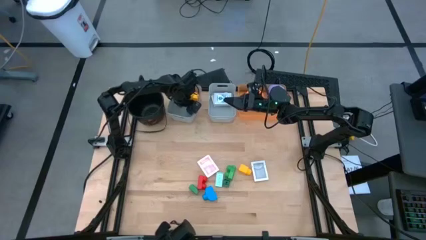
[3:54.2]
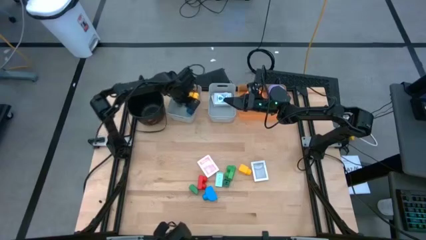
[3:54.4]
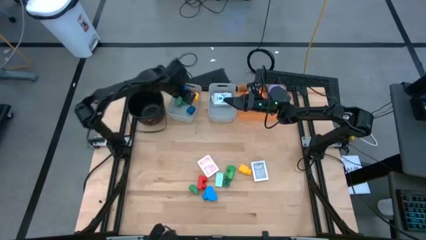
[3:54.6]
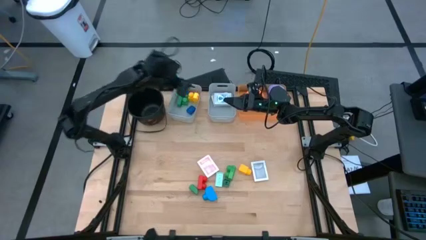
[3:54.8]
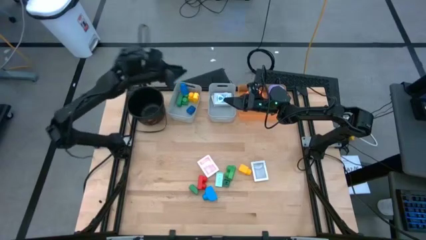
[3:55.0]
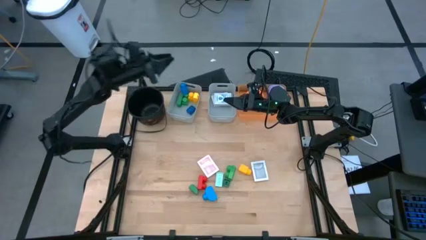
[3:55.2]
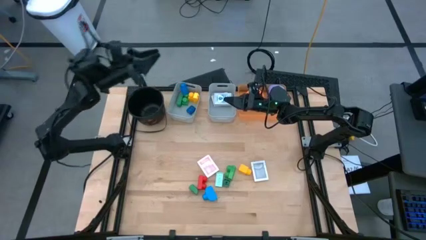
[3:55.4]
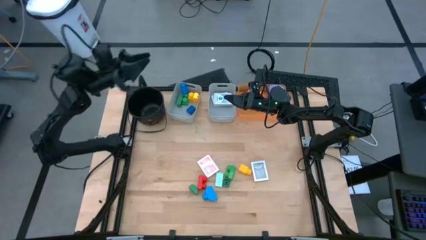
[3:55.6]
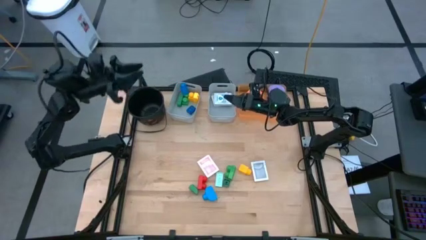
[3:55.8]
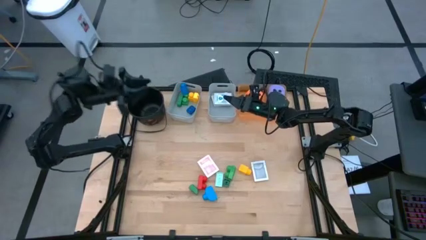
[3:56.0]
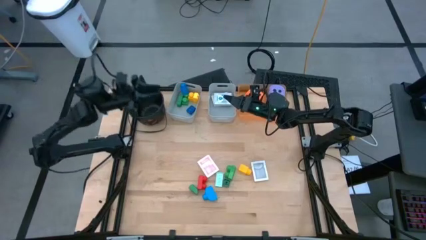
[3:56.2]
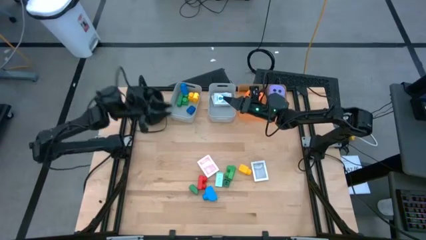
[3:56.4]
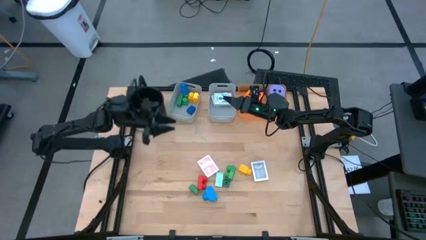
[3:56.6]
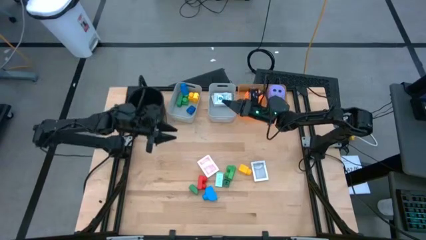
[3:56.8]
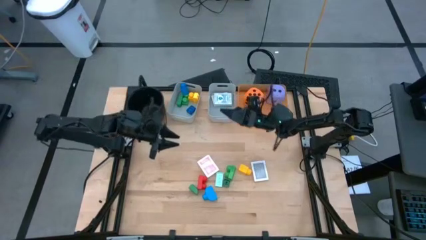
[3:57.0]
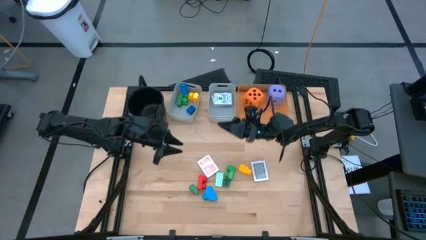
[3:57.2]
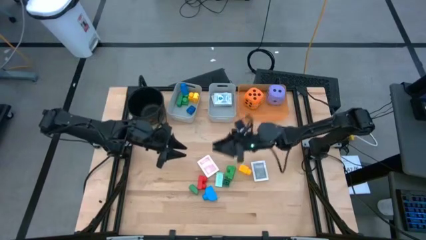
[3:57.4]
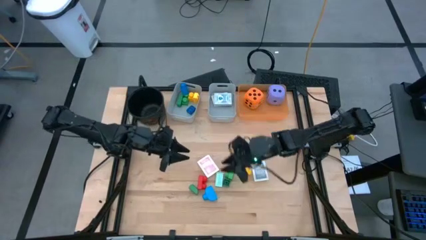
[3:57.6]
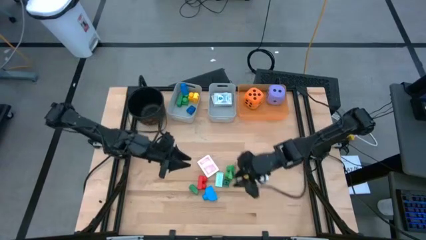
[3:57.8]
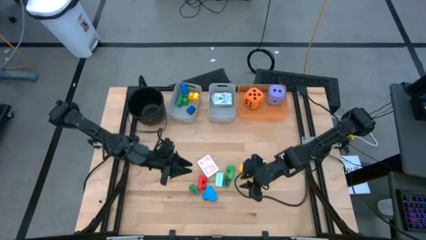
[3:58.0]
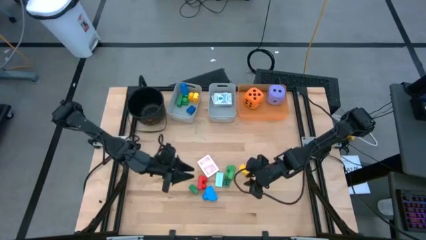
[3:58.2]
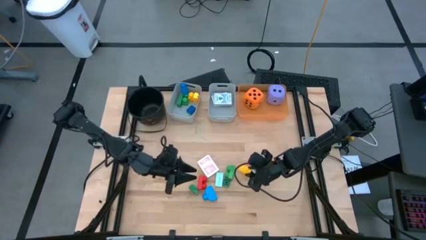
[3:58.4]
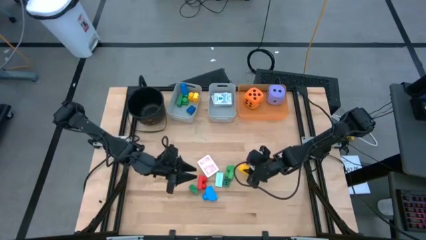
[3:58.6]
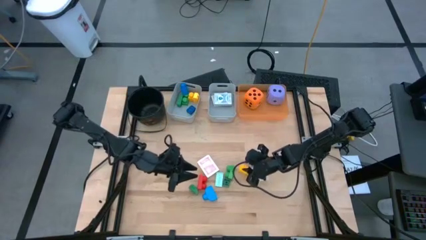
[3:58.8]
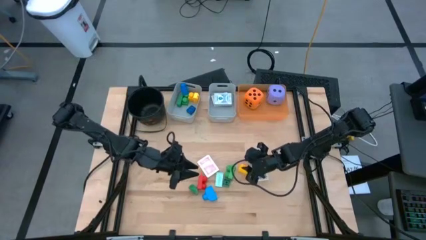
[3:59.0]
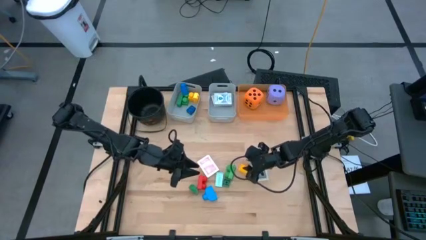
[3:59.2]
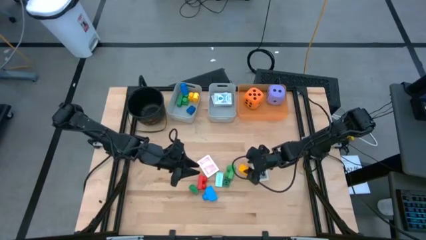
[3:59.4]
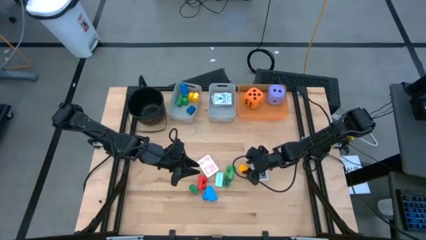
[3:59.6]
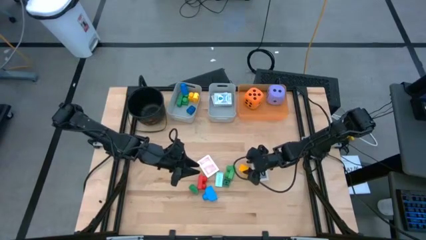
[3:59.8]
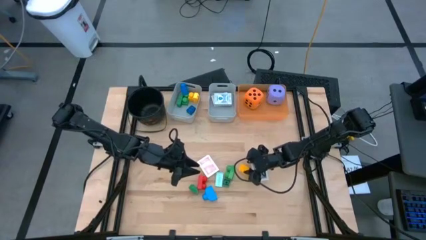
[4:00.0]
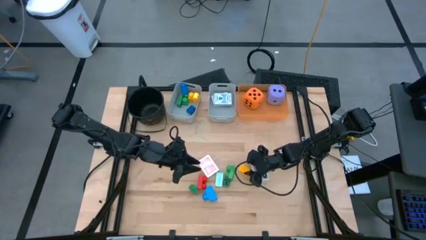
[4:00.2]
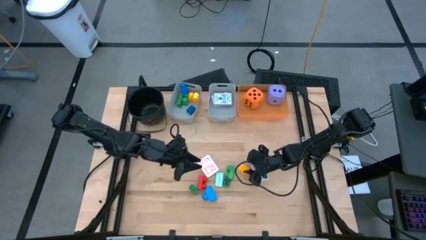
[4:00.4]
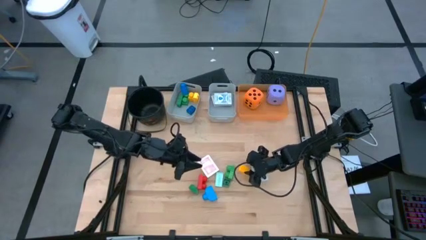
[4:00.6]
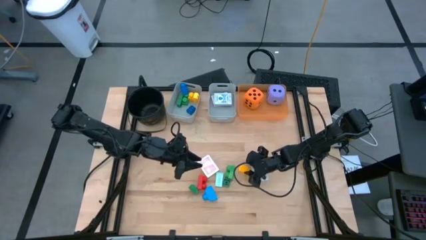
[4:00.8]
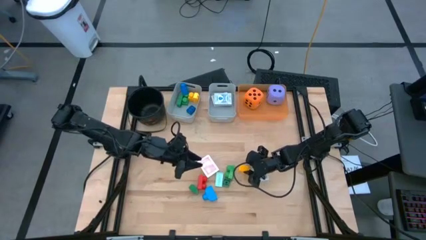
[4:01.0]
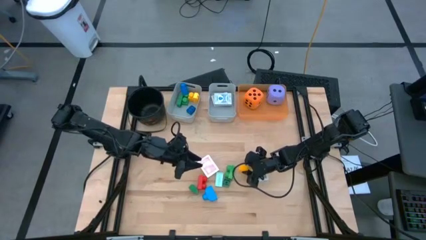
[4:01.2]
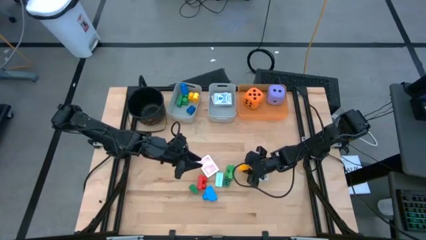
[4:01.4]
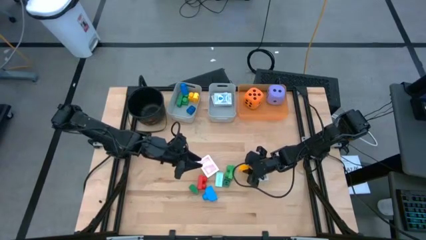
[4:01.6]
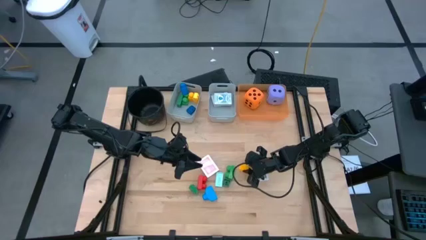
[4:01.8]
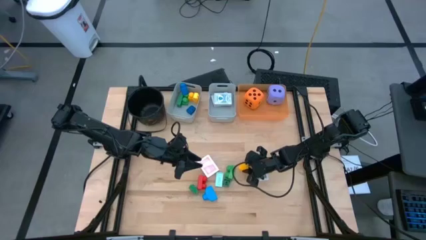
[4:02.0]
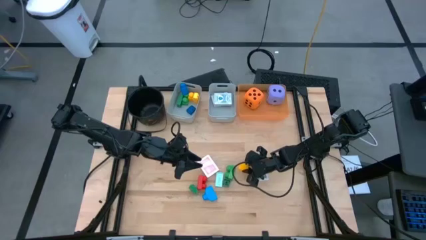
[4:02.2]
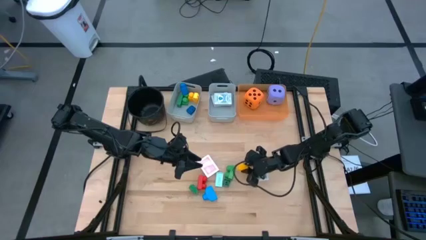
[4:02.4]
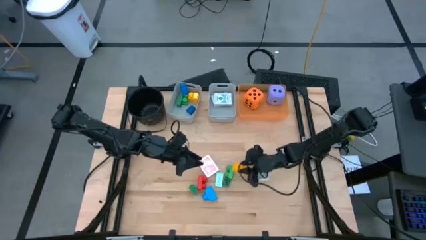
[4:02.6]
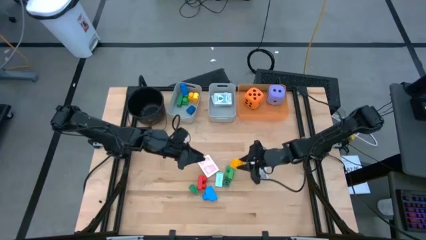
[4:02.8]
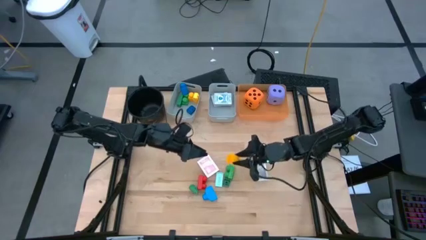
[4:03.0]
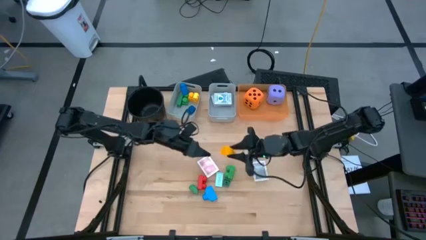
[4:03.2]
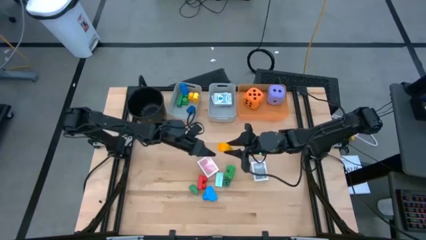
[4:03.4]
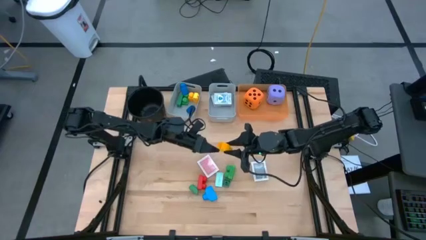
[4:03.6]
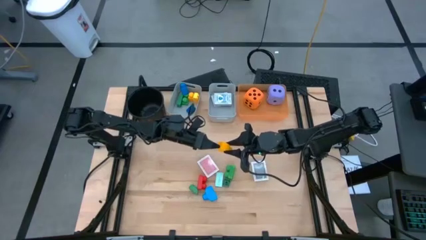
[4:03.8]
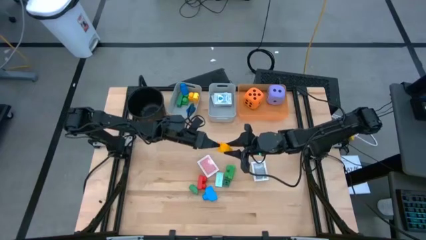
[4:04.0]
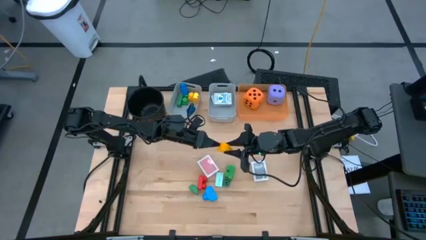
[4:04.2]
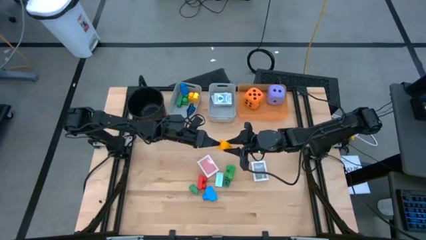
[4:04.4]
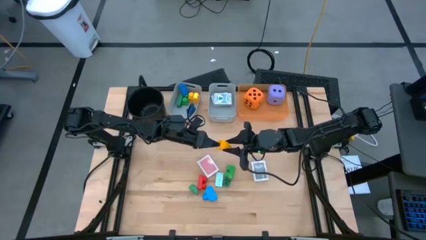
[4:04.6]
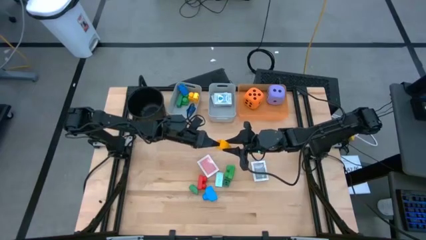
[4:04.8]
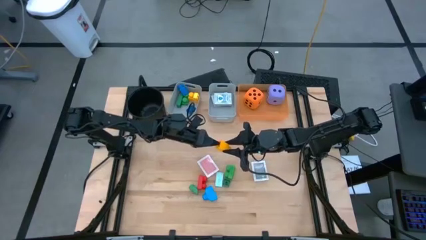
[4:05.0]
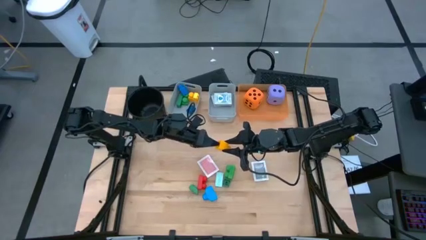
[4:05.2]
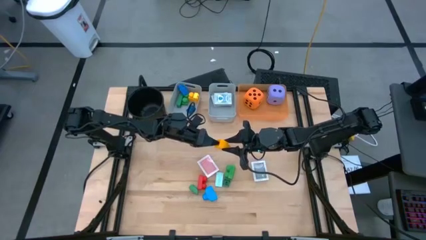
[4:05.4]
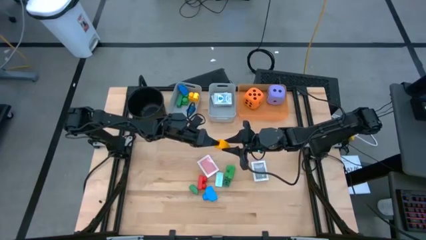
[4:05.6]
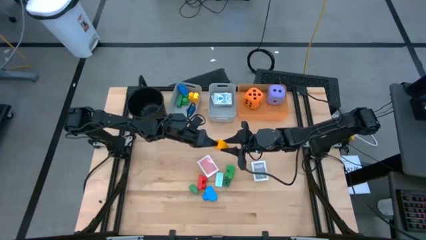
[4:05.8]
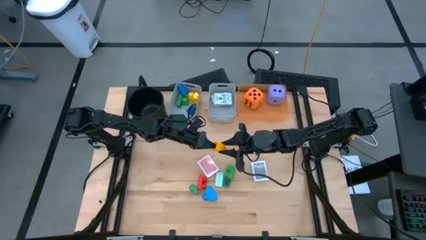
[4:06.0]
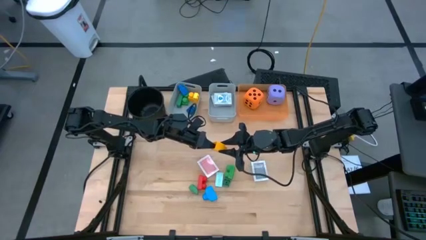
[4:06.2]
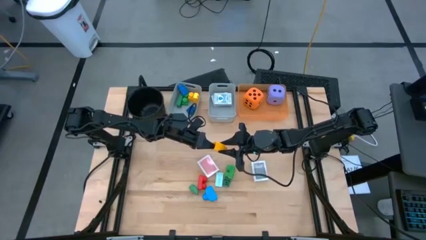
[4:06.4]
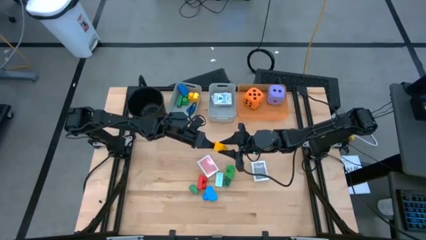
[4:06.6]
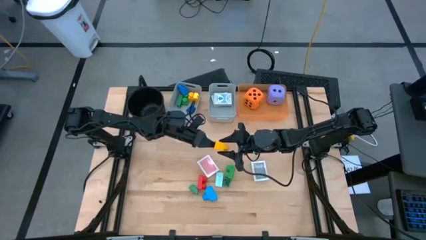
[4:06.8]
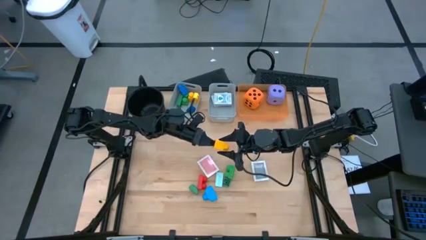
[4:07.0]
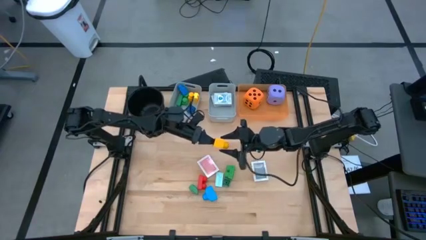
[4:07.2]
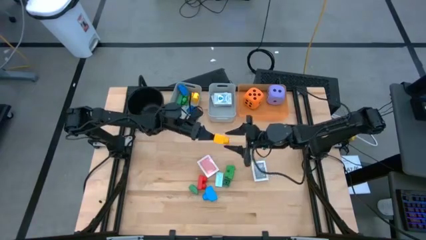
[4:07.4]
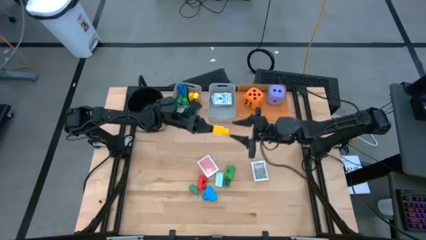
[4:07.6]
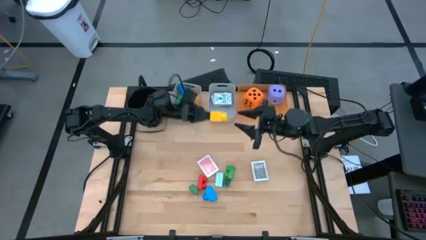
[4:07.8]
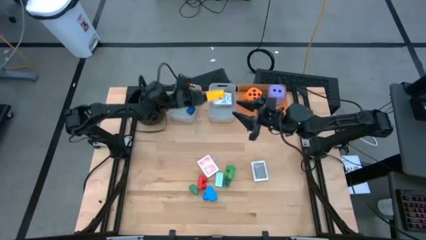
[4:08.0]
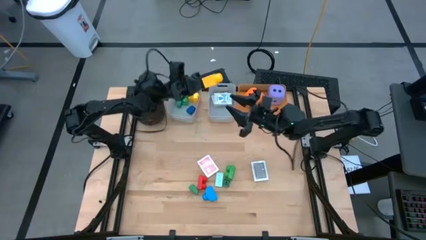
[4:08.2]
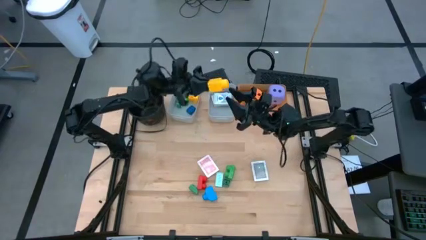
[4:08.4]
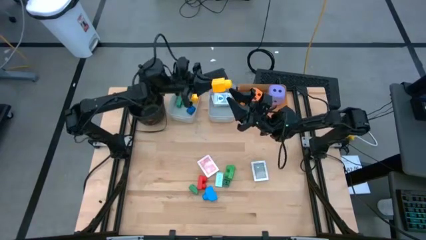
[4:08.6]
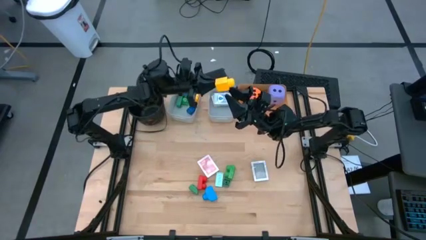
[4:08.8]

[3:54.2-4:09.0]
Task: Pick & Place Toys
Put the yellow game piece into the left gray bin
